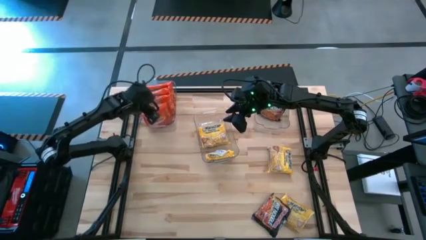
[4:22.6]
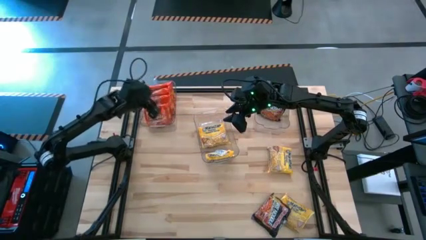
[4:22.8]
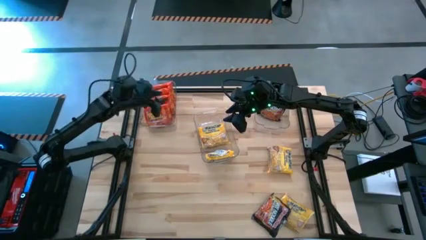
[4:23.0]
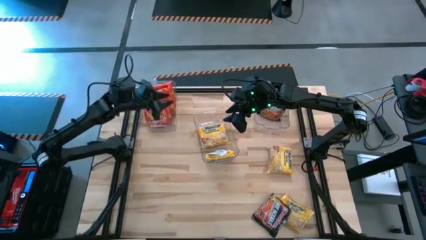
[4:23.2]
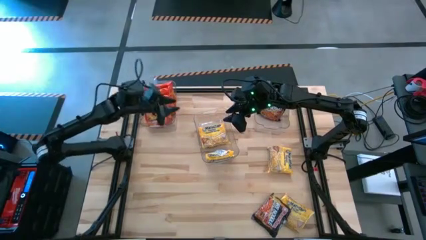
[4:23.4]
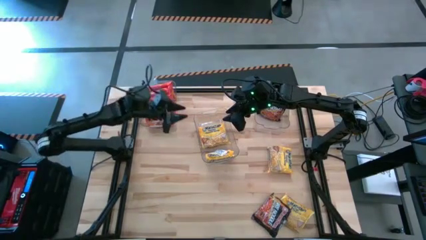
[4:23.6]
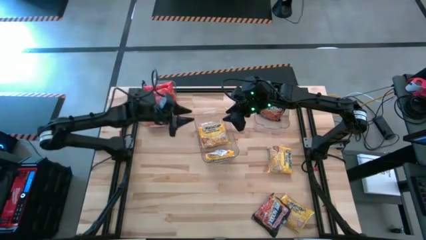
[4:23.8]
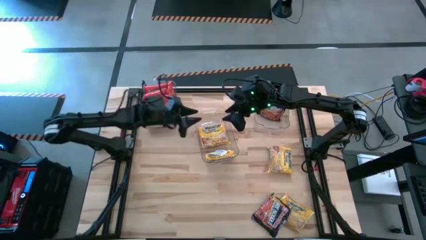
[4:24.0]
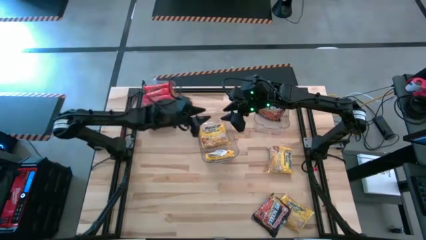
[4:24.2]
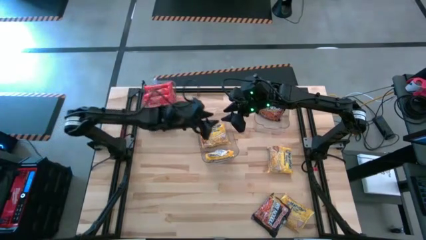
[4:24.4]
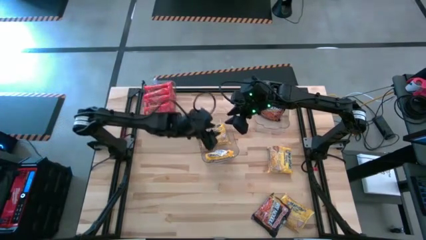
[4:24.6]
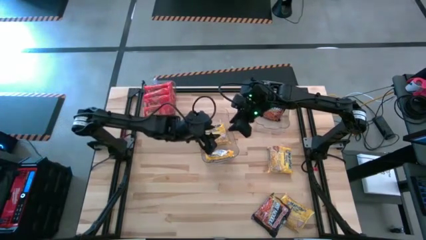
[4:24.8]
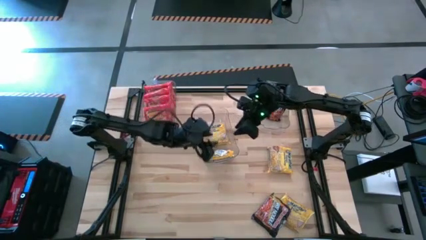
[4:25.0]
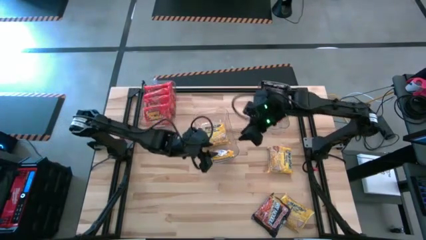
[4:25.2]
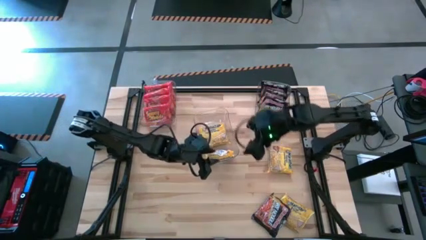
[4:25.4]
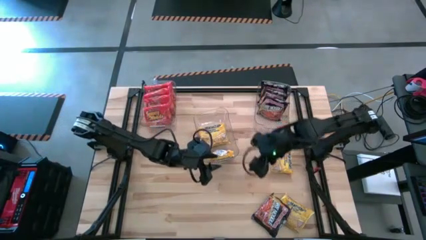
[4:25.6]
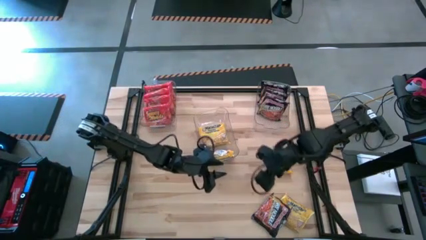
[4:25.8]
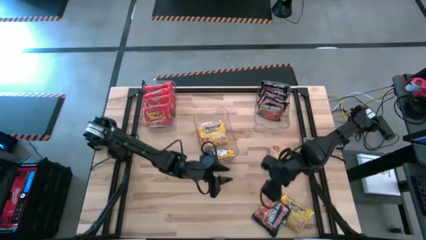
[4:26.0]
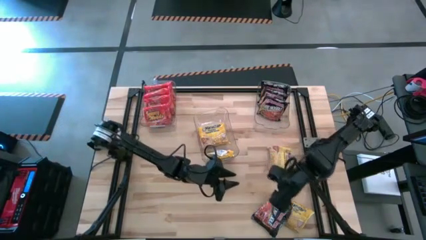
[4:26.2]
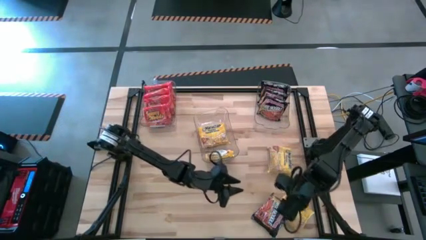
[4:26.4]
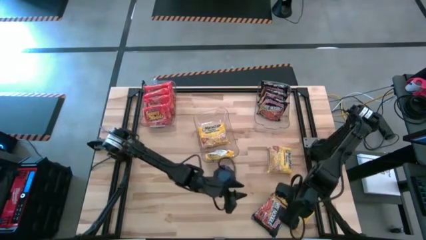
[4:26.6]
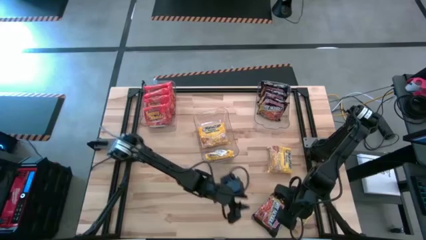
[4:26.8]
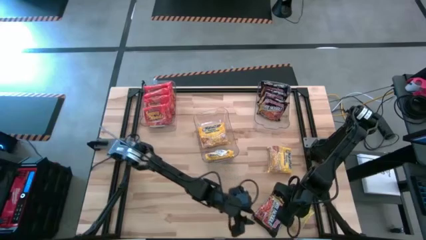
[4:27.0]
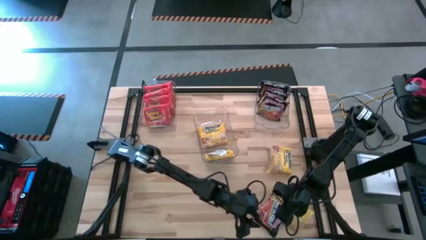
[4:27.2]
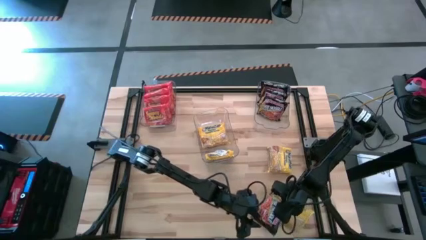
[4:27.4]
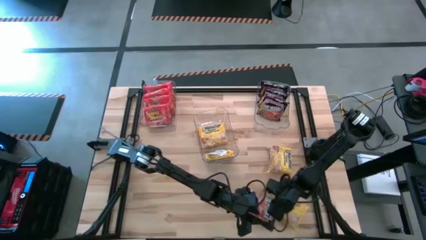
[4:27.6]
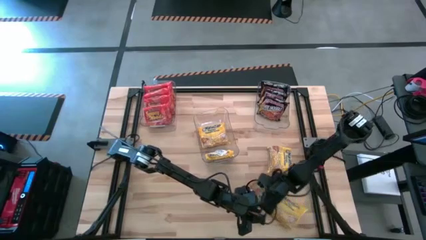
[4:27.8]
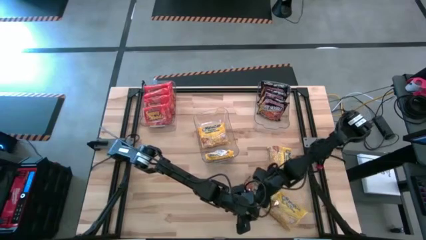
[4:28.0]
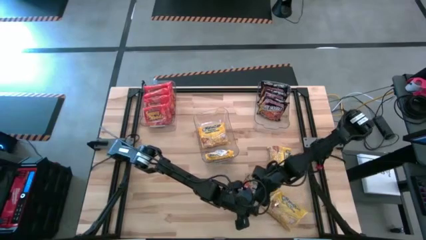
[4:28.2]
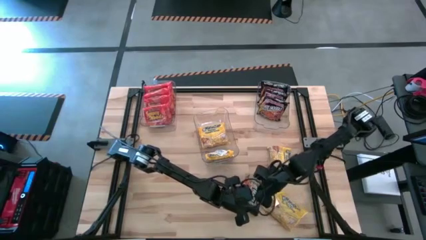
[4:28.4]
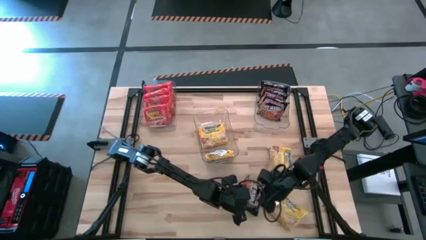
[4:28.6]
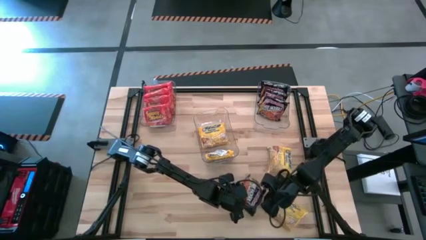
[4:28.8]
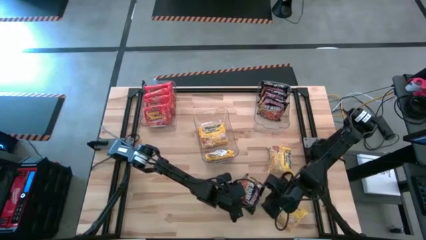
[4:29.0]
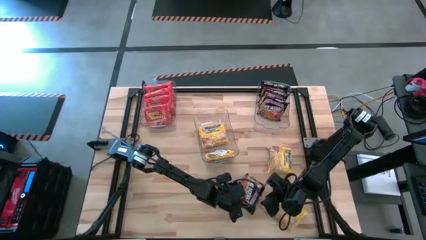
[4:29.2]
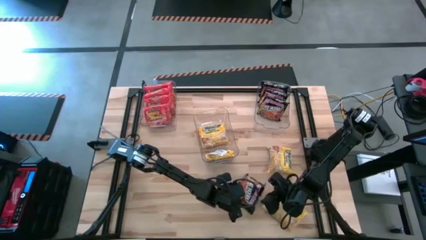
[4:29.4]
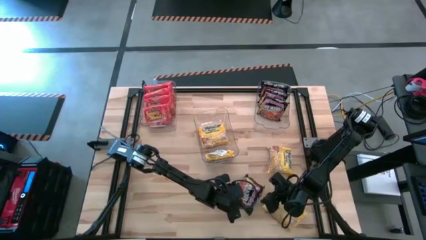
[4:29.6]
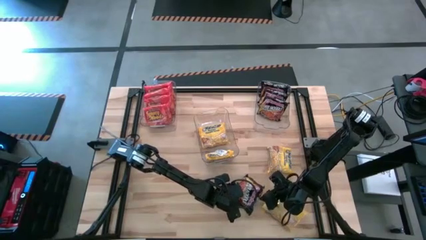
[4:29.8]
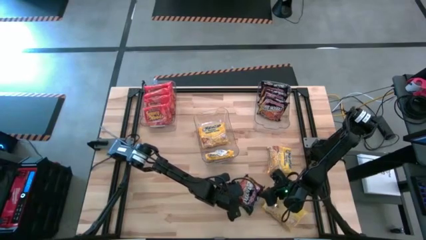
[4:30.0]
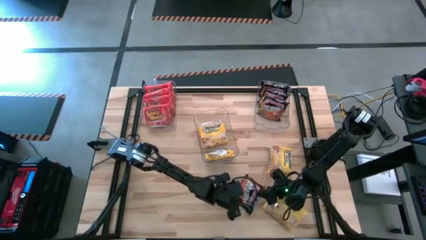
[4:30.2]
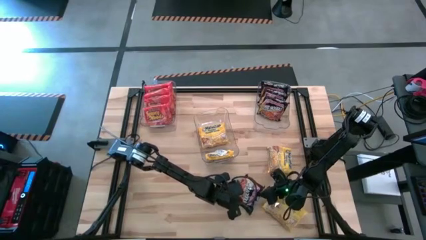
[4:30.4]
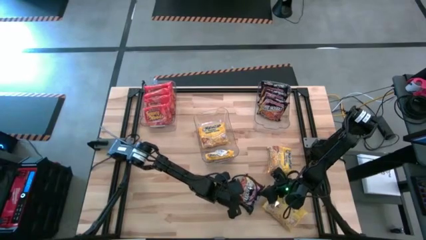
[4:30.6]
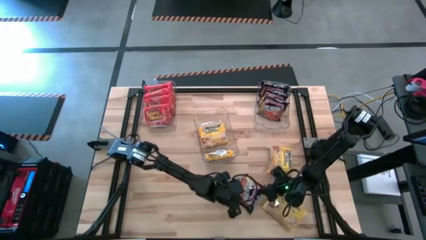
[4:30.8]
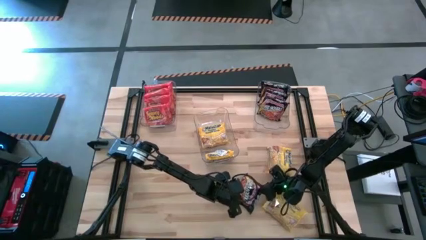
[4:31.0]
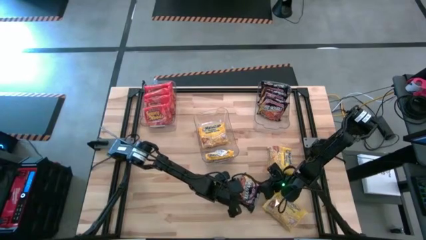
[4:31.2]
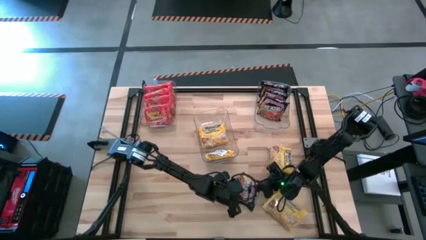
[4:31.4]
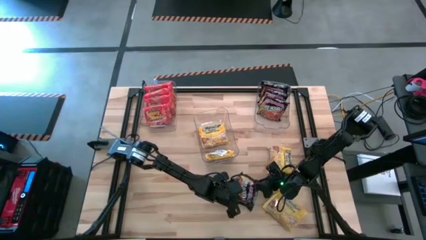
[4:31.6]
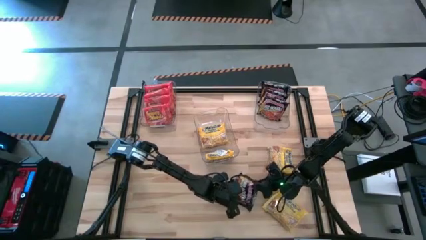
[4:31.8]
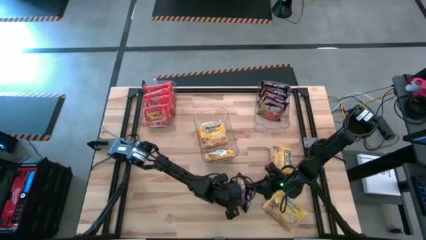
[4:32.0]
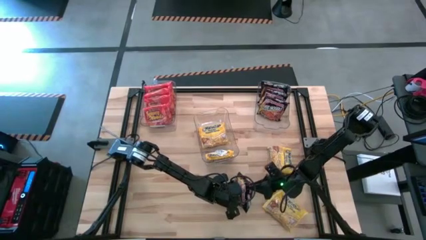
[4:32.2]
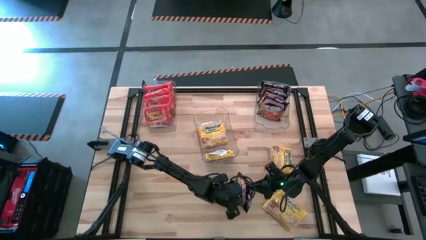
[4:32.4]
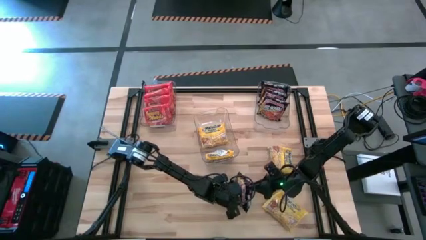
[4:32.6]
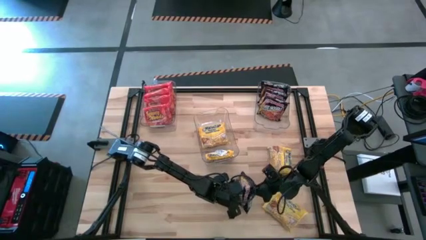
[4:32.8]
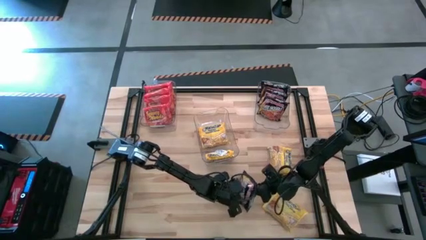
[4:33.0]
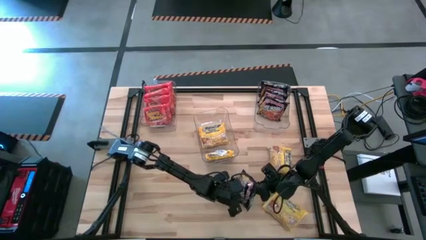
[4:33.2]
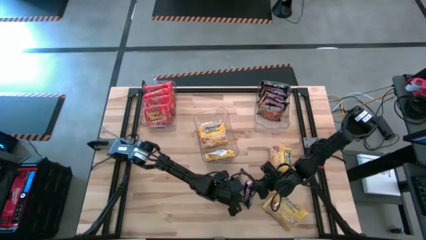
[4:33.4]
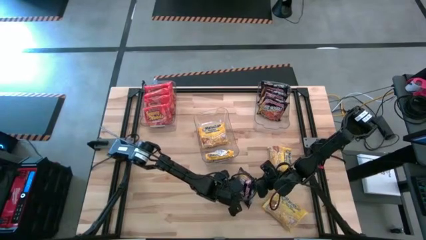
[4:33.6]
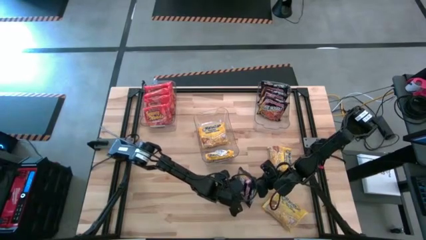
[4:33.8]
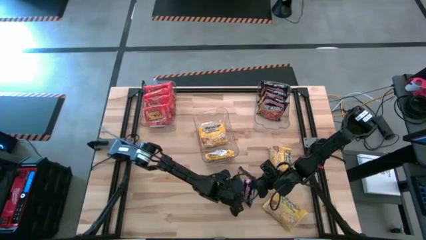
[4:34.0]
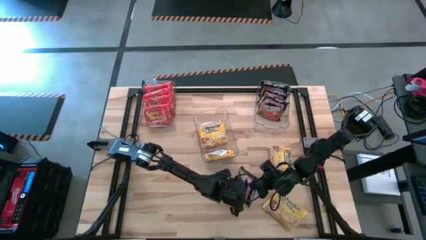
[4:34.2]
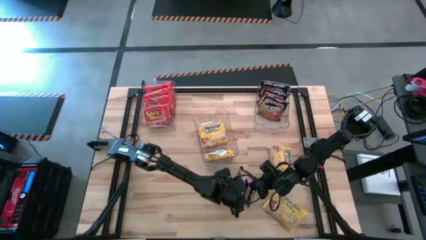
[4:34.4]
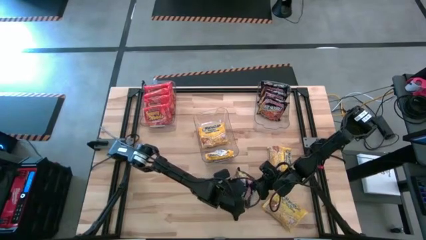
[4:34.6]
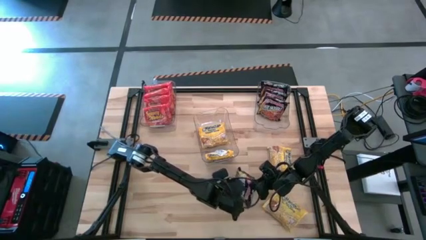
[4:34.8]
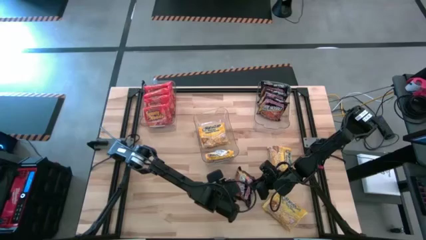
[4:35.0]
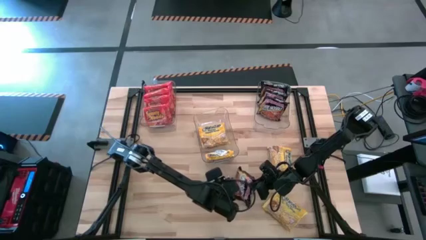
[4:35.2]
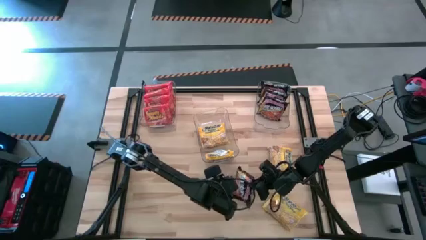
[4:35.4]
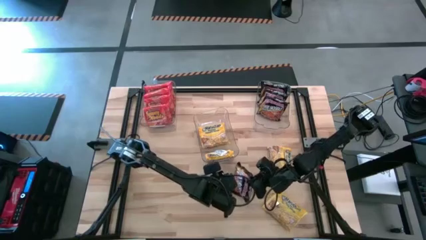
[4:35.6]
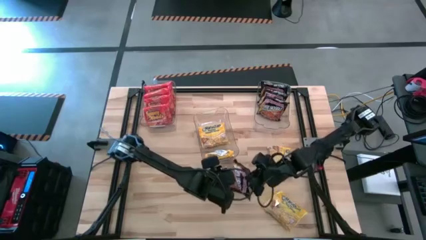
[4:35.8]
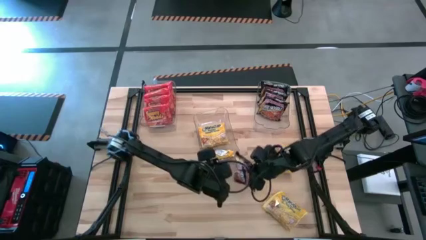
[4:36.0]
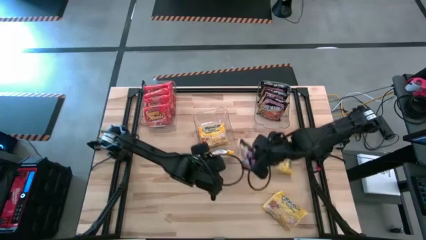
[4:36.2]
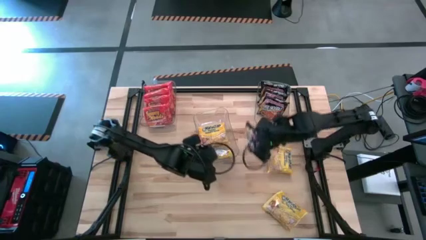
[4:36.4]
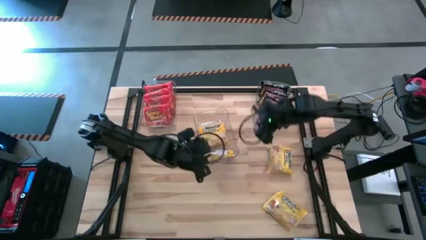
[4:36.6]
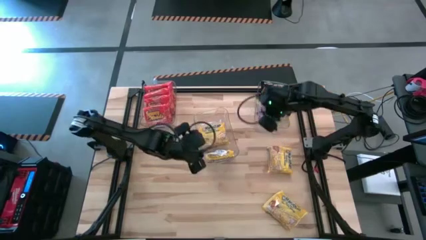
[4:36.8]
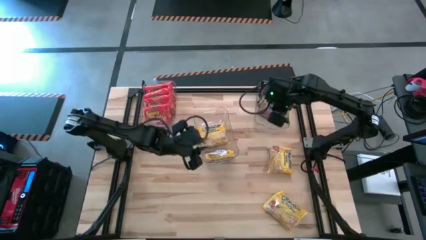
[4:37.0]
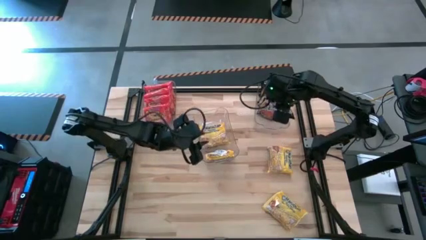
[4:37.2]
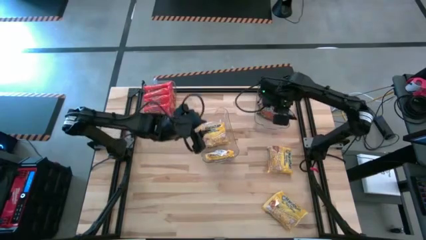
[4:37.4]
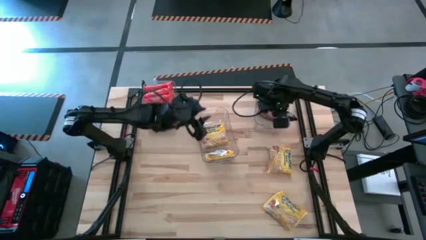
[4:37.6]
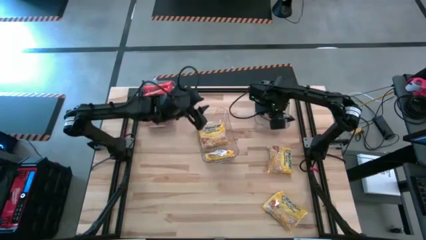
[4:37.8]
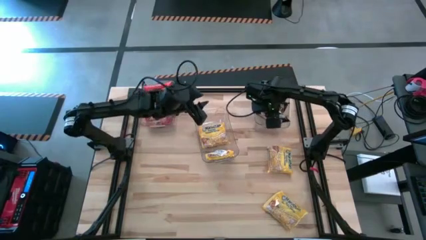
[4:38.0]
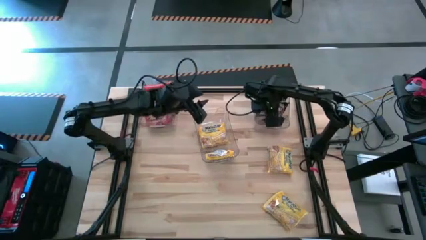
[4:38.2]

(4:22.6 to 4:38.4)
Task: Sort Maruchan noodles
Put the black noodle pack into the top right transparent bin

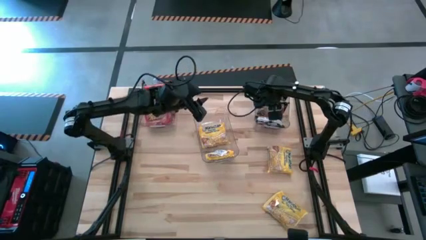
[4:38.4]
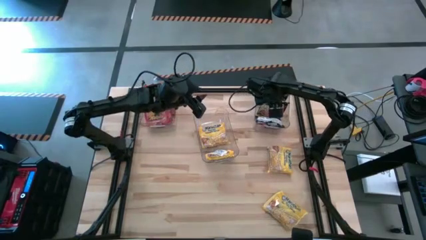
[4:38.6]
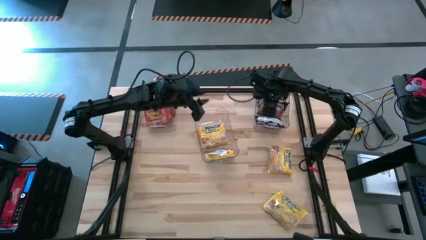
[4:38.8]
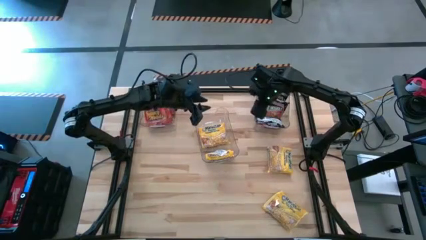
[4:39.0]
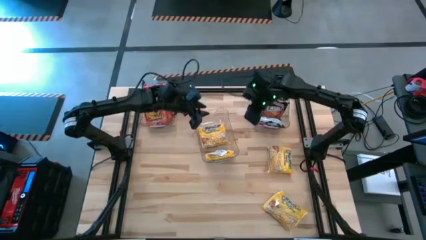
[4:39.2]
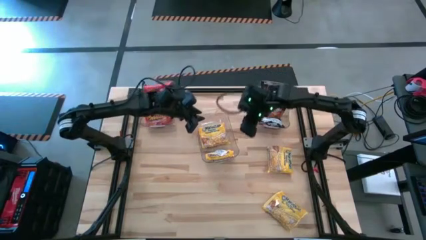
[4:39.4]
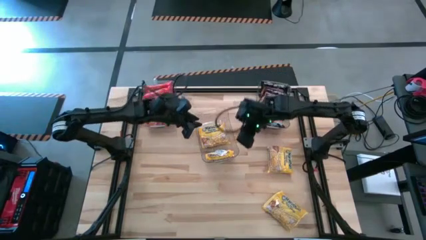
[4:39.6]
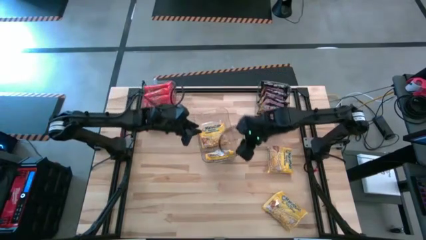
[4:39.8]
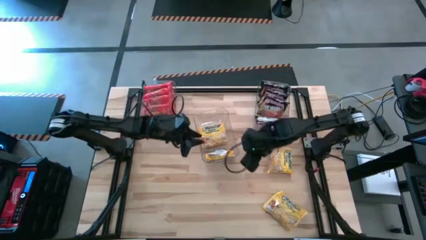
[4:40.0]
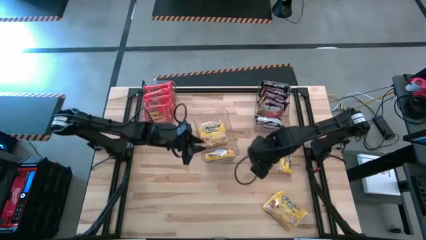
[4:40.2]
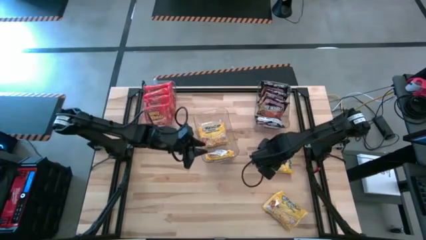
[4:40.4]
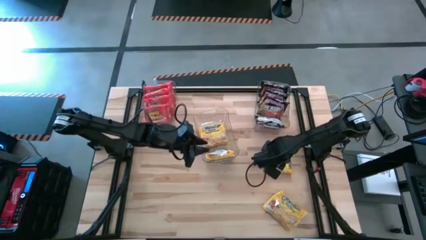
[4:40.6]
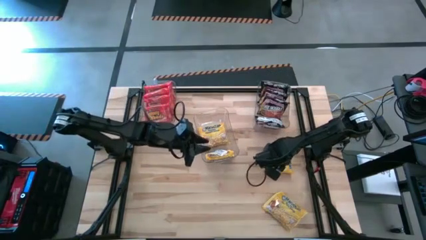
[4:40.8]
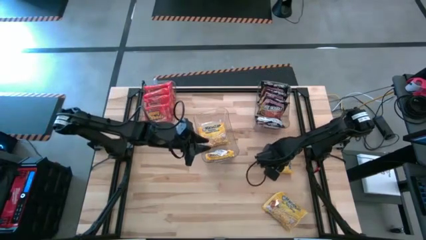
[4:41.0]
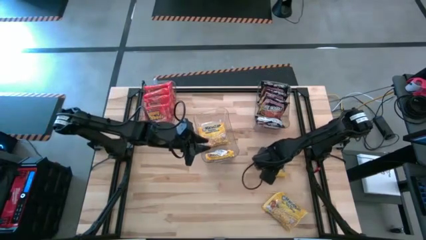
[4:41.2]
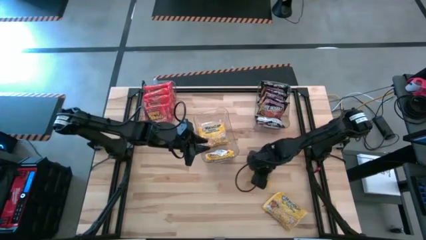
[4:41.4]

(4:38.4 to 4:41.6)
Move the top yellow noodle pack to the center of the table
